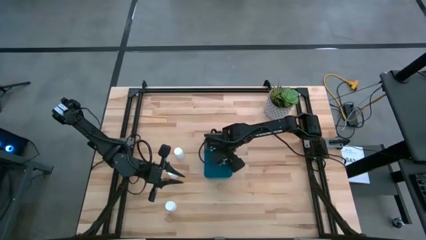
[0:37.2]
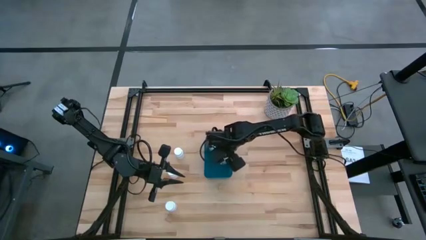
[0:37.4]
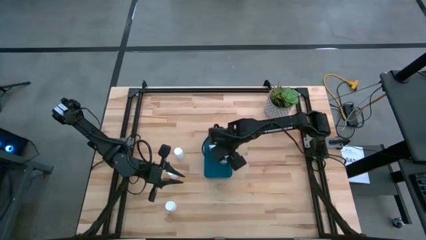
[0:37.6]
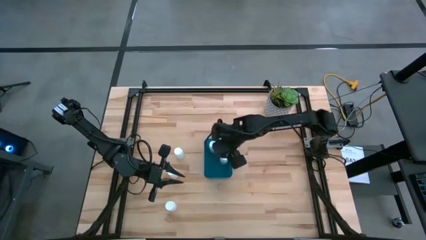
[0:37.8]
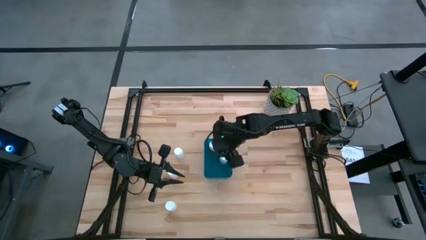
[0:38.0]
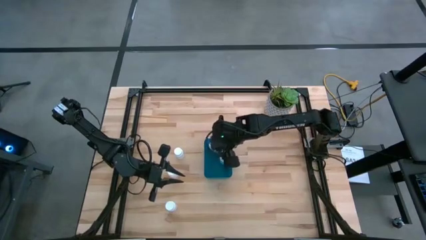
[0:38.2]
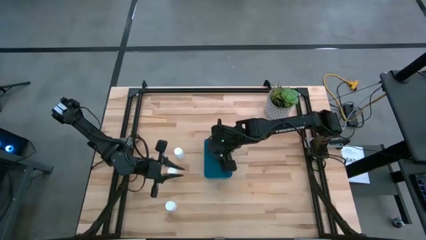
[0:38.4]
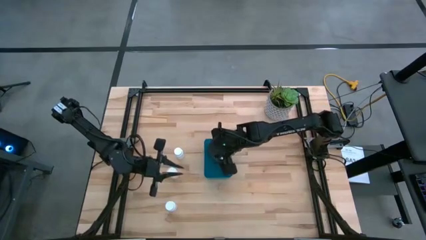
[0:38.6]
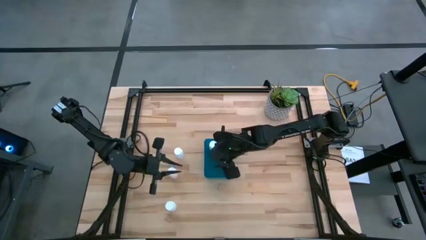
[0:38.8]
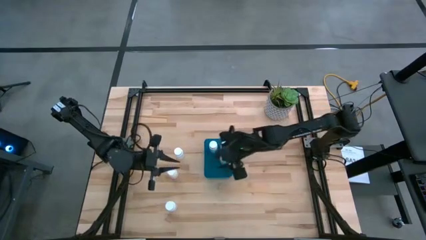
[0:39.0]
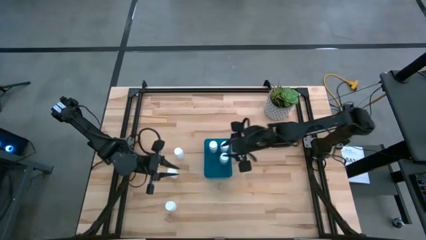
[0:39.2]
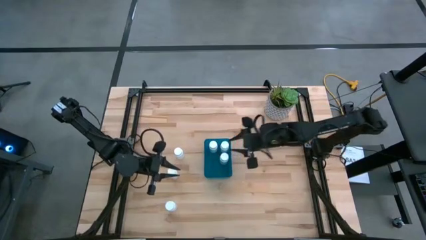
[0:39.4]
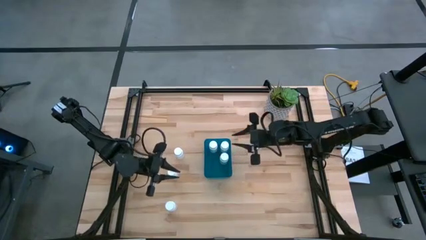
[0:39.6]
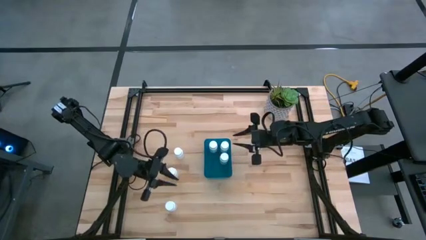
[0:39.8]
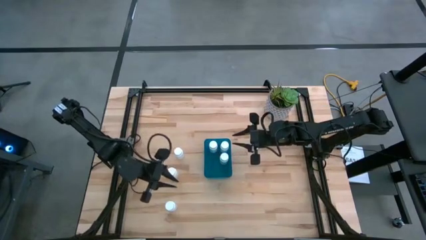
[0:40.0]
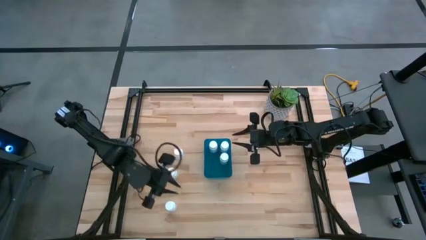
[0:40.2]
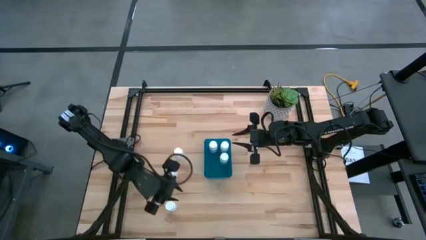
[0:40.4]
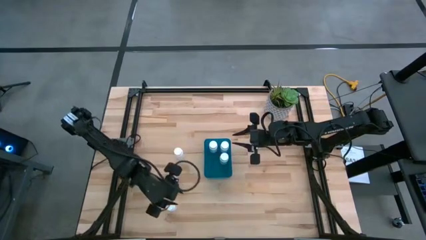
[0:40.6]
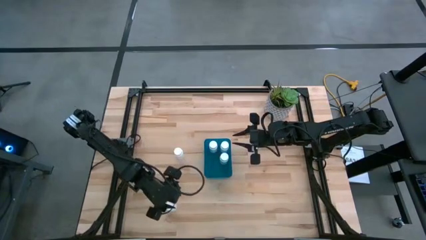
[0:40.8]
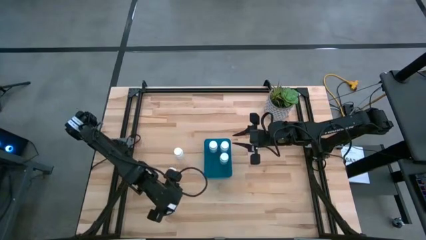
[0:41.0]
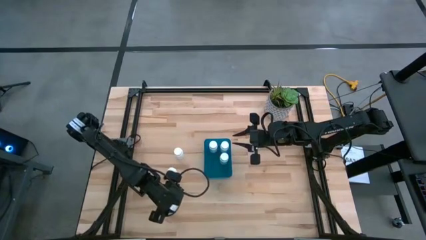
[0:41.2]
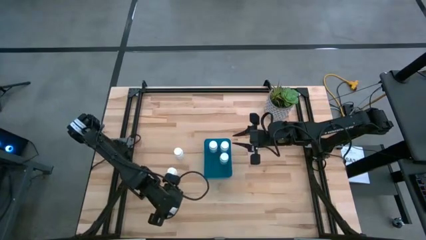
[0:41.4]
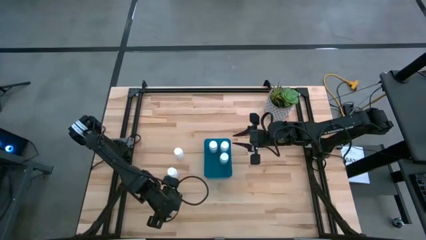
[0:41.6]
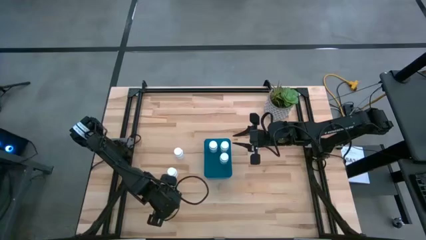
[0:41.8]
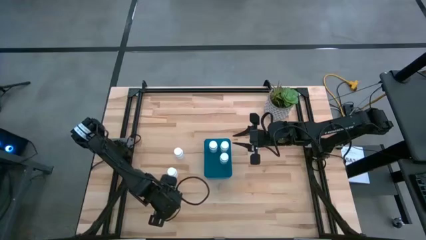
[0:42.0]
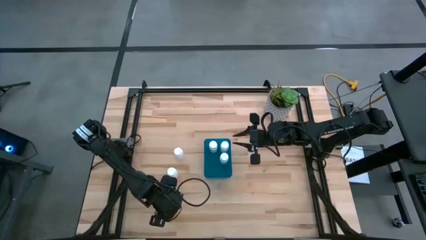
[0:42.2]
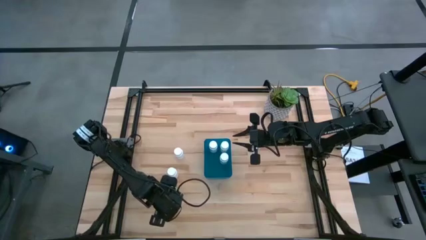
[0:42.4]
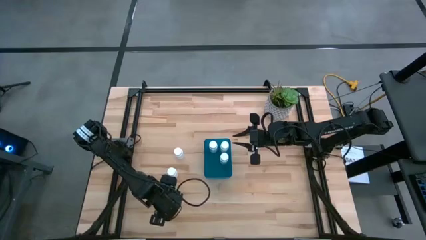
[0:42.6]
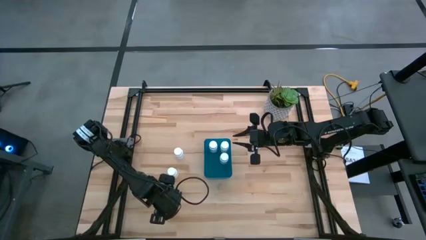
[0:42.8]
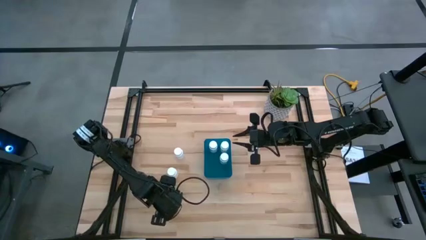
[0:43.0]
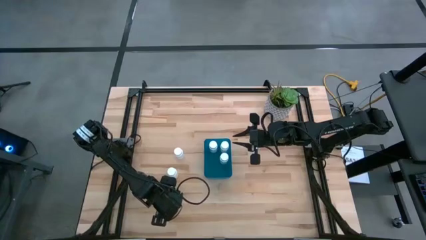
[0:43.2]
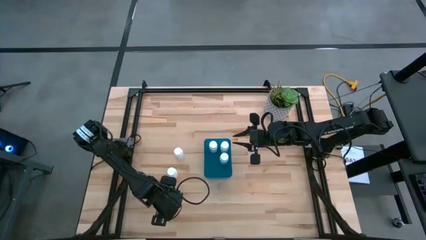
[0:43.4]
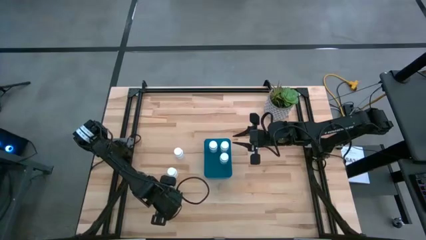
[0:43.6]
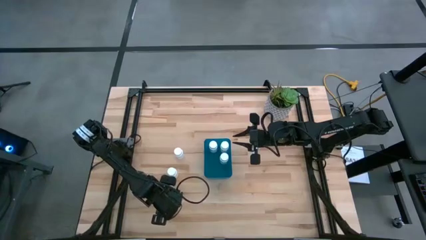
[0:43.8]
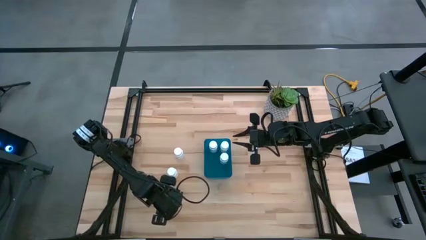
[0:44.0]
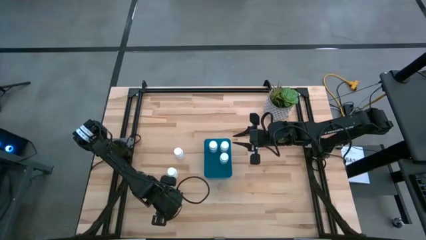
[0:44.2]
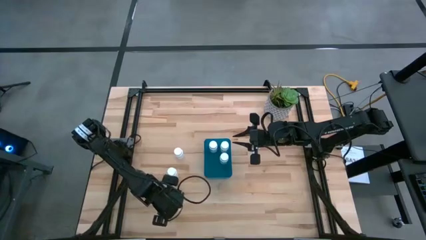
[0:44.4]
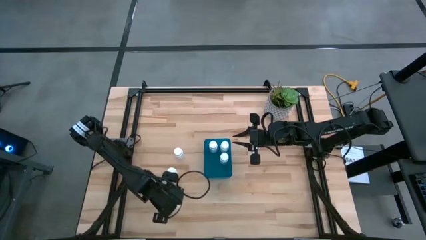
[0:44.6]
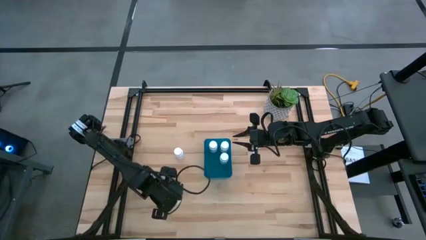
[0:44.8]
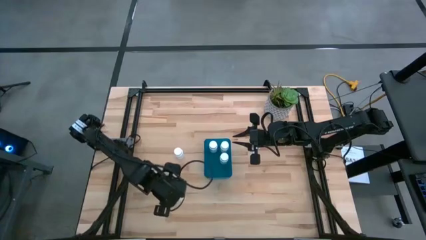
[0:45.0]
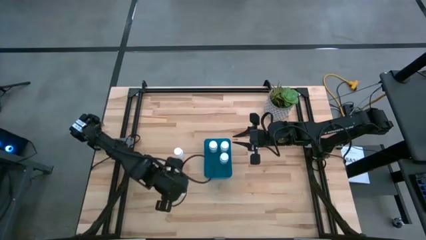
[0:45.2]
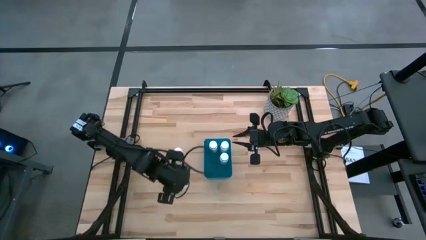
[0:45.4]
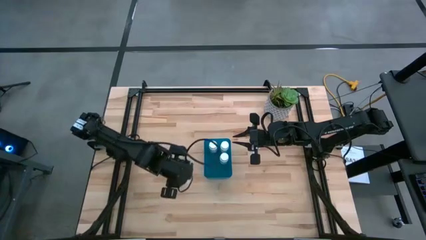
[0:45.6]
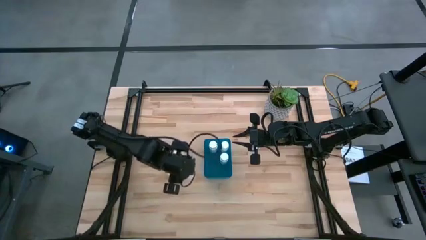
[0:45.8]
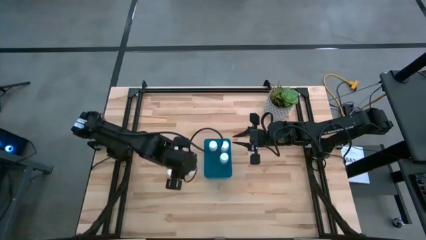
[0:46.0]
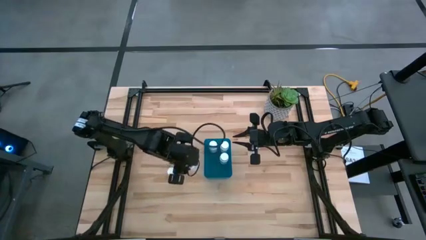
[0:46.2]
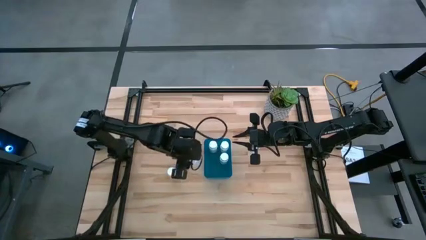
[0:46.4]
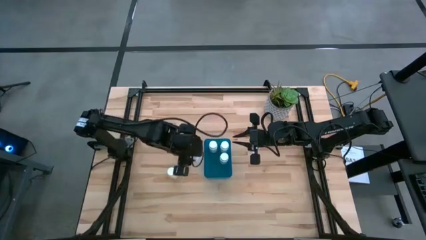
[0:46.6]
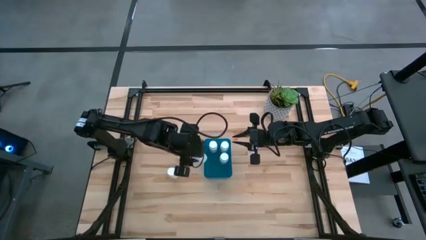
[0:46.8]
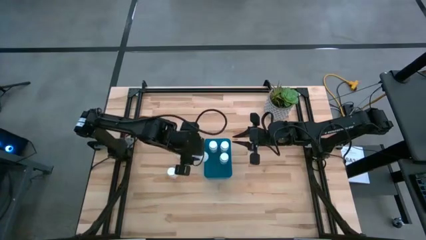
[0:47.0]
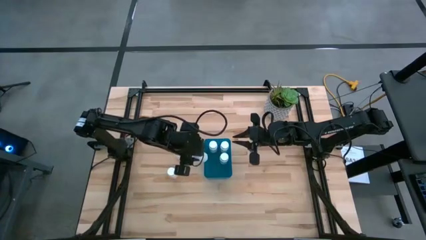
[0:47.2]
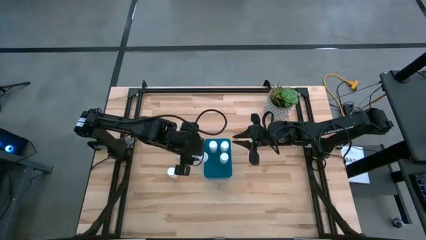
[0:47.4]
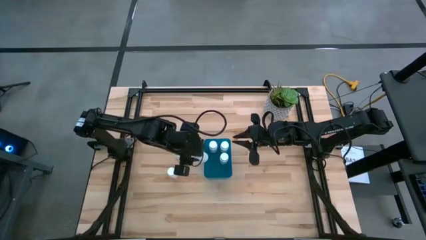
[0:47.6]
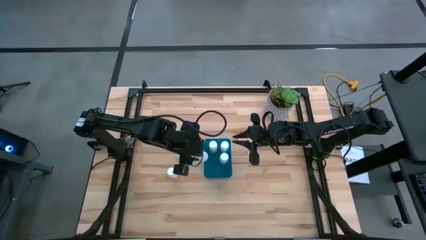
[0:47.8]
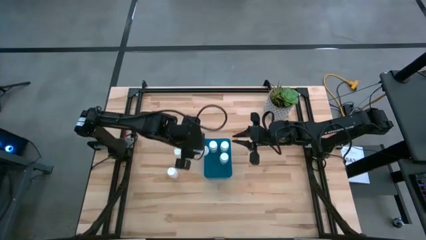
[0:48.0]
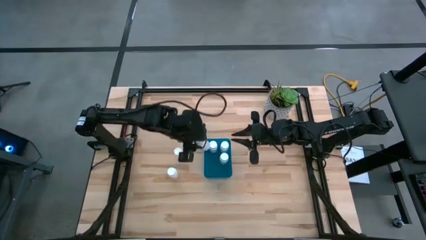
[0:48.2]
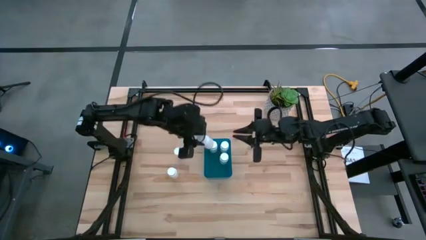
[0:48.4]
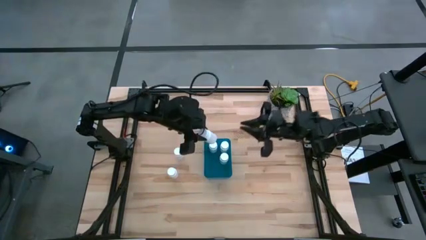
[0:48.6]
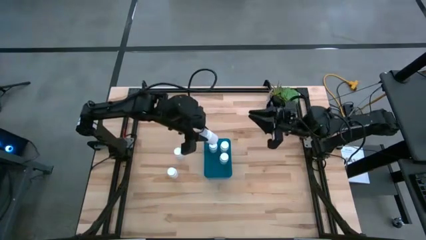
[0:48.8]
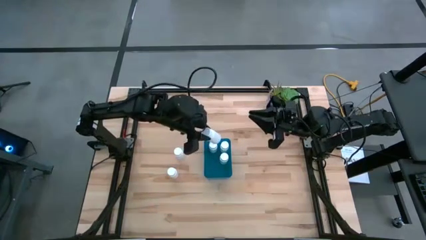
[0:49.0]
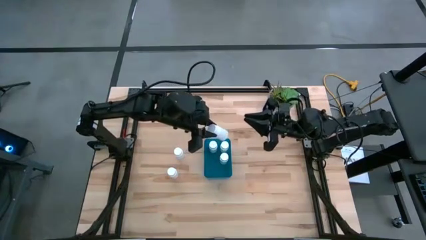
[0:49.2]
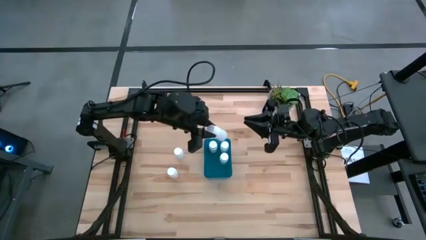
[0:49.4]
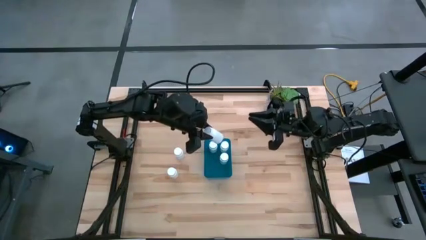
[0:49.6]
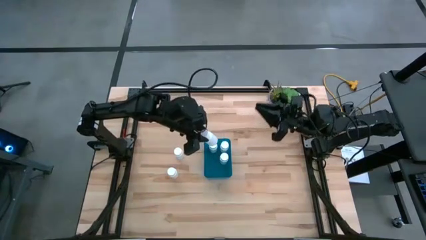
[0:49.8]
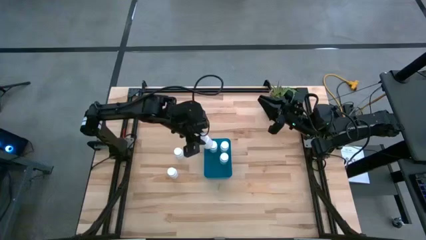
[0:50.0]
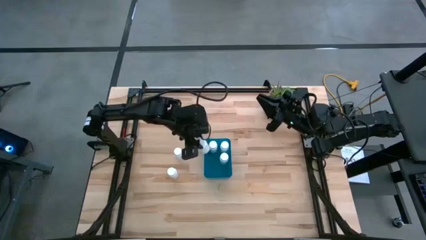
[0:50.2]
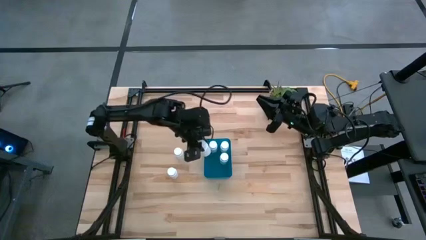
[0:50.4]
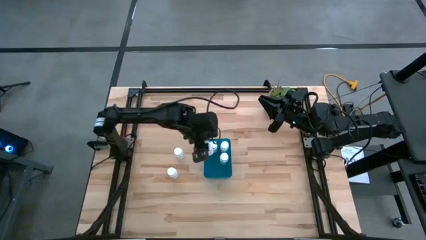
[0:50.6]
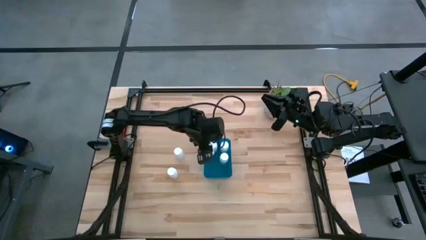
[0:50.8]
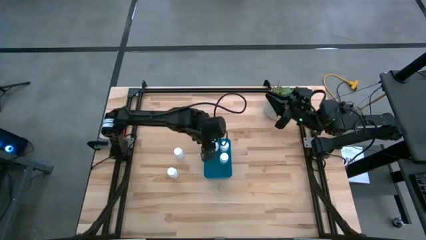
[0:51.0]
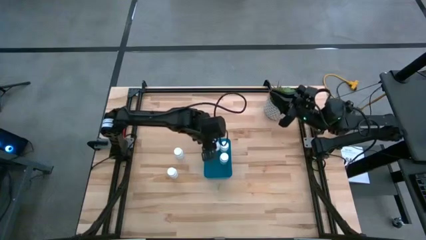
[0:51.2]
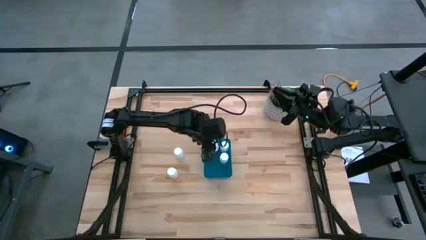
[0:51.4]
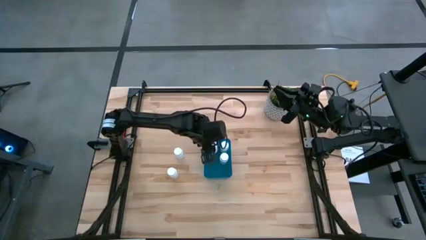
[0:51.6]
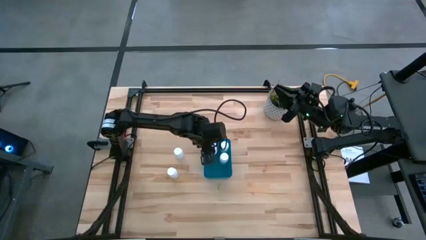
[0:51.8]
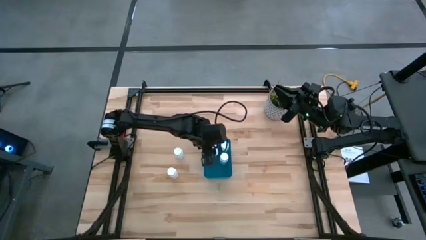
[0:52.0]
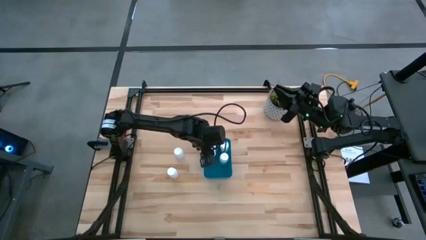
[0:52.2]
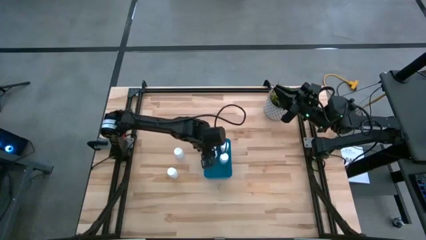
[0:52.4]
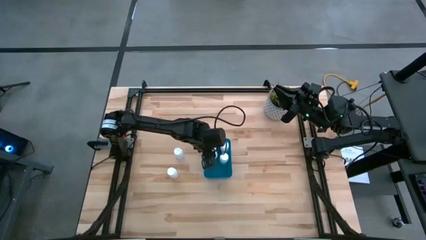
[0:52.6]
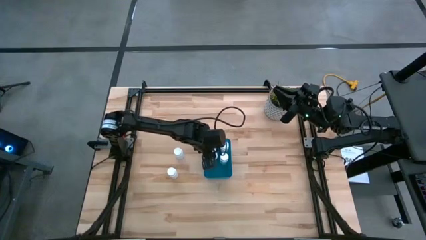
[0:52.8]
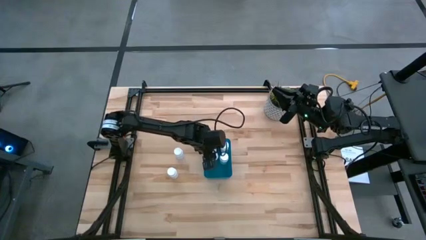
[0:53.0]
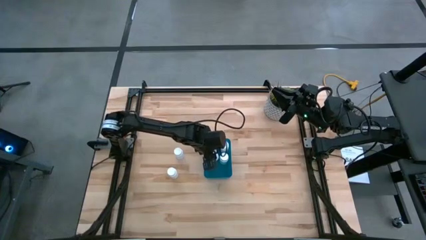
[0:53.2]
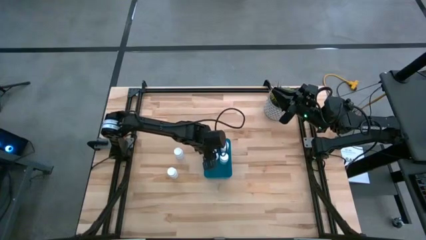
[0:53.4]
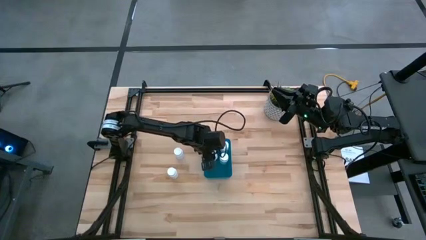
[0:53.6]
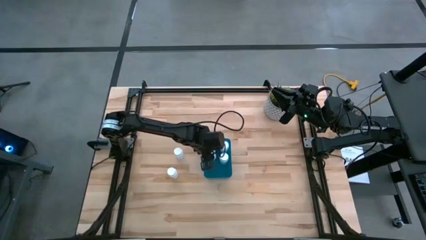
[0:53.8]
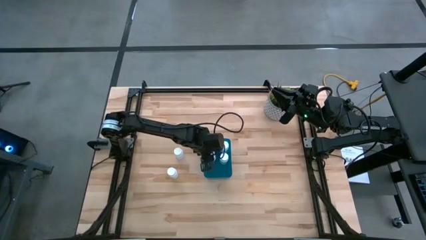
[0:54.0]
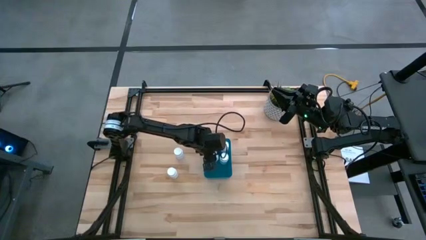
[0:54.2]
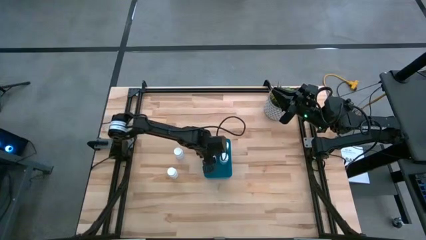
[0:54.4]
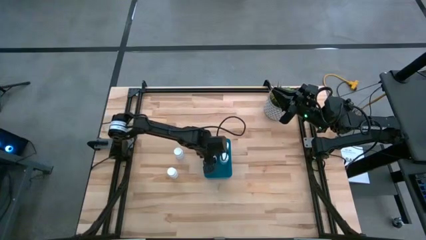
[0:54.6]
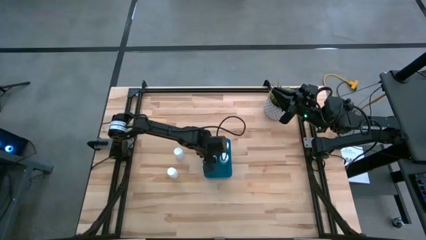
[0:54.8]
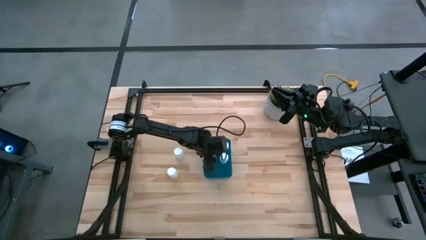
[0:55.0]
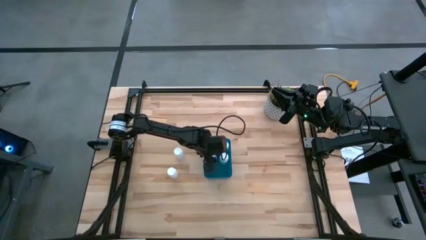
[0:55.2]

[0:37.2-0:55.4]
Task: Pick and place pill bottles into a basket
Put the medicine bottle in the blue bin
